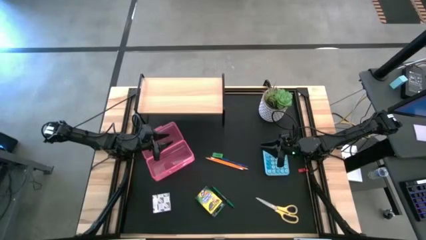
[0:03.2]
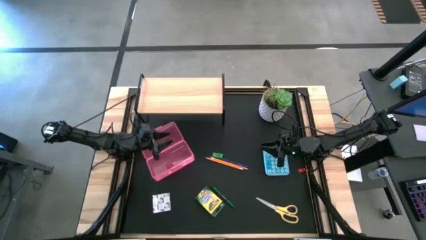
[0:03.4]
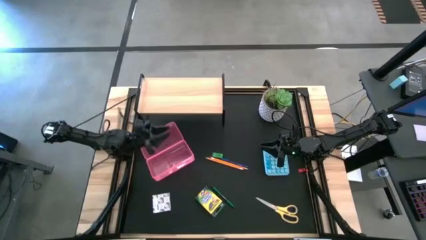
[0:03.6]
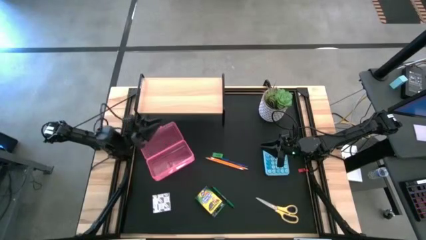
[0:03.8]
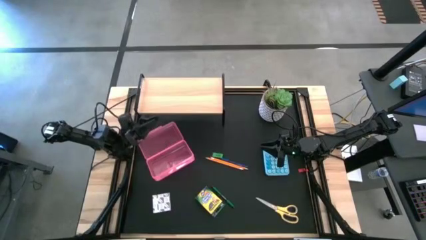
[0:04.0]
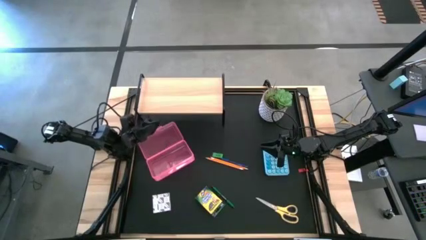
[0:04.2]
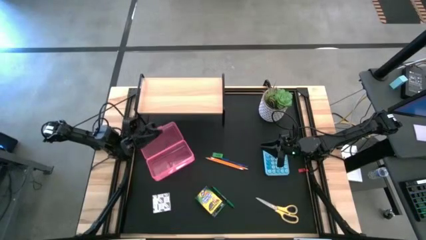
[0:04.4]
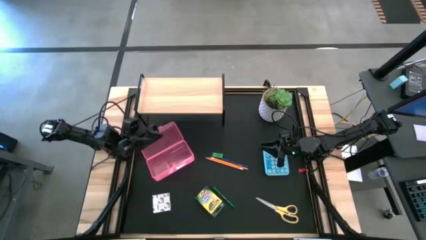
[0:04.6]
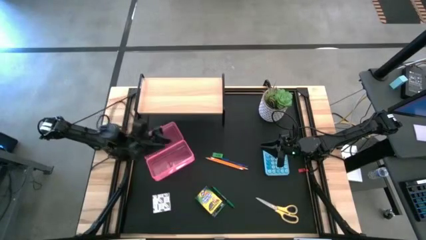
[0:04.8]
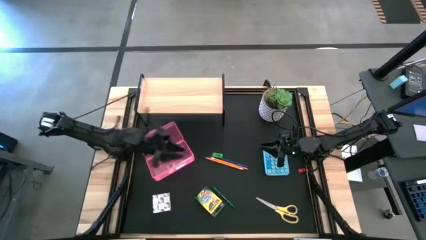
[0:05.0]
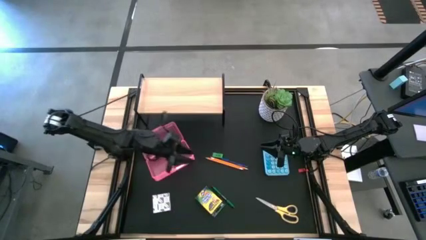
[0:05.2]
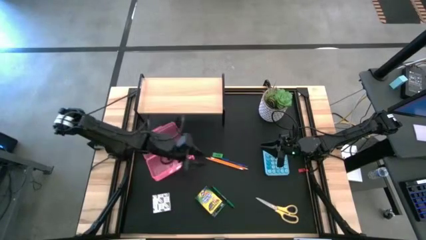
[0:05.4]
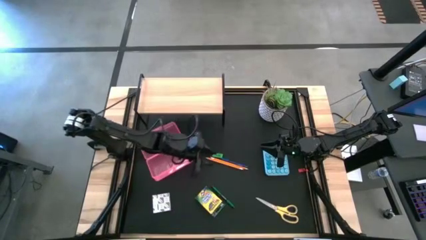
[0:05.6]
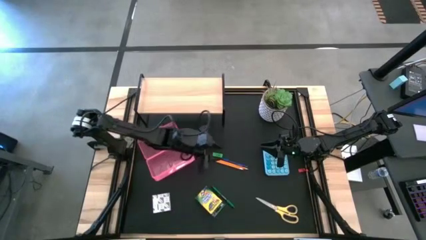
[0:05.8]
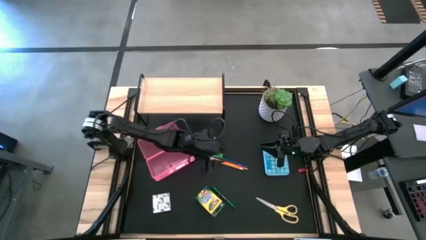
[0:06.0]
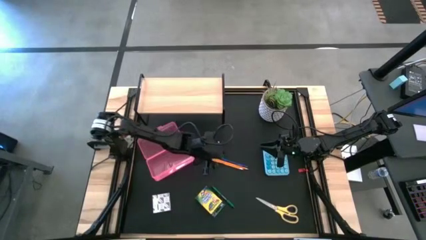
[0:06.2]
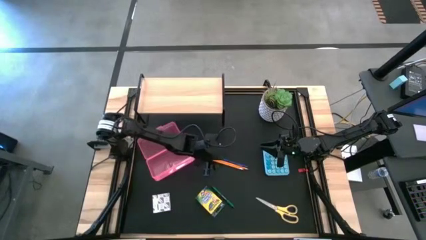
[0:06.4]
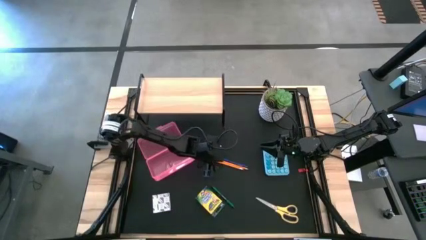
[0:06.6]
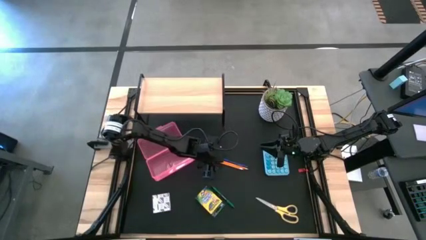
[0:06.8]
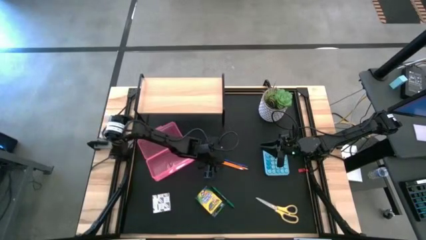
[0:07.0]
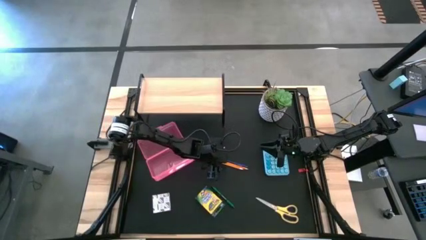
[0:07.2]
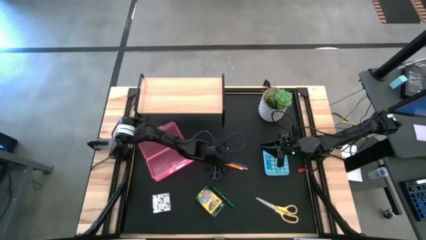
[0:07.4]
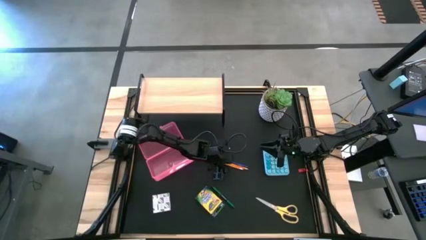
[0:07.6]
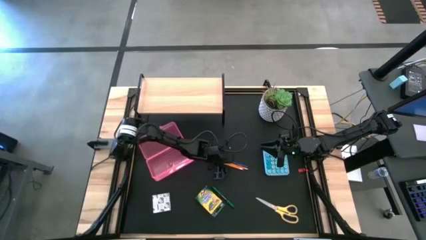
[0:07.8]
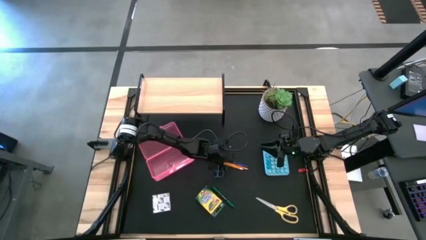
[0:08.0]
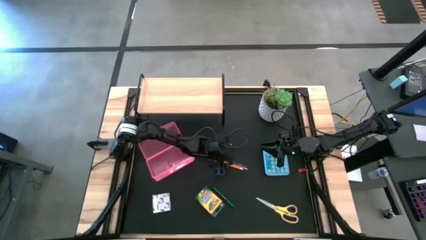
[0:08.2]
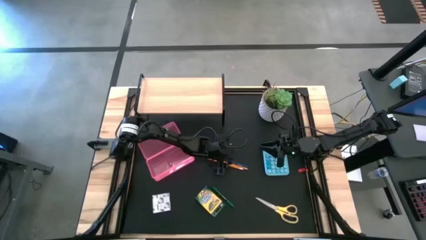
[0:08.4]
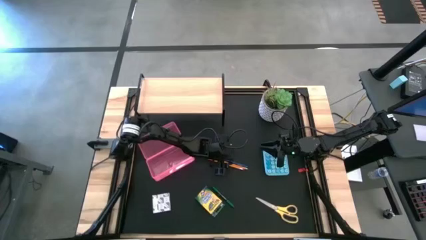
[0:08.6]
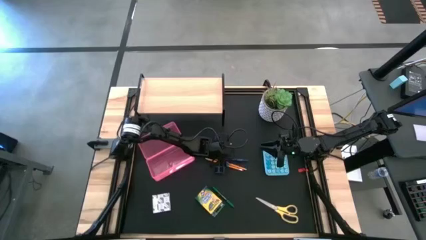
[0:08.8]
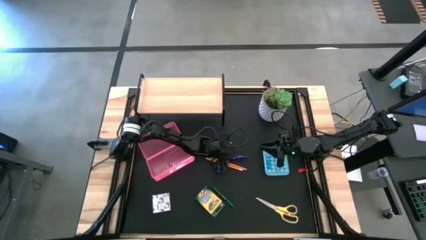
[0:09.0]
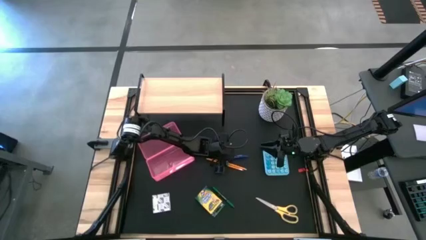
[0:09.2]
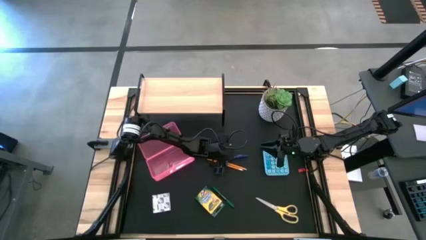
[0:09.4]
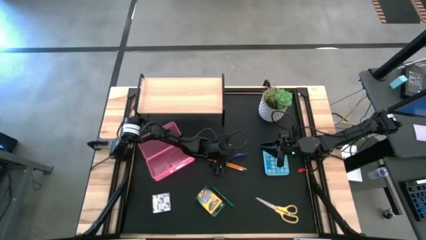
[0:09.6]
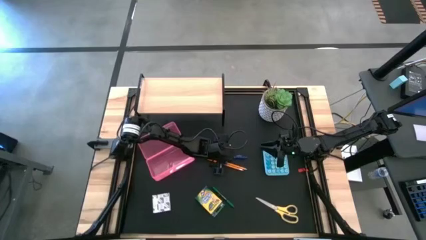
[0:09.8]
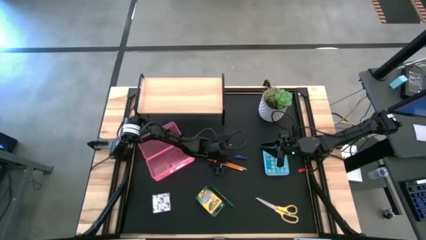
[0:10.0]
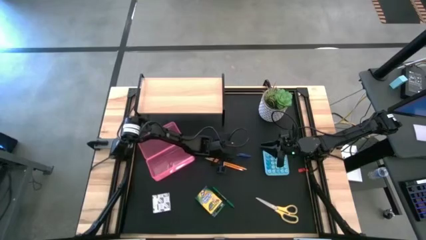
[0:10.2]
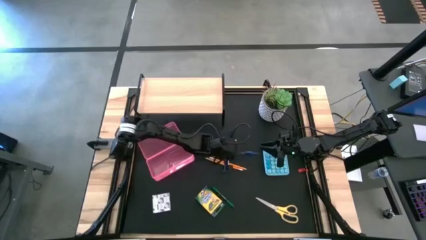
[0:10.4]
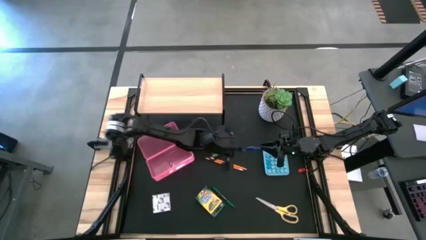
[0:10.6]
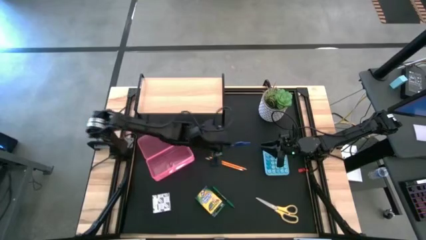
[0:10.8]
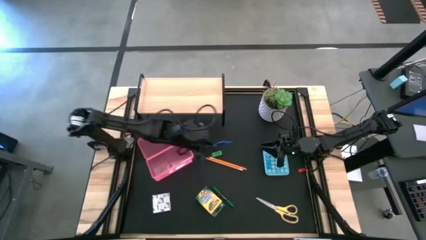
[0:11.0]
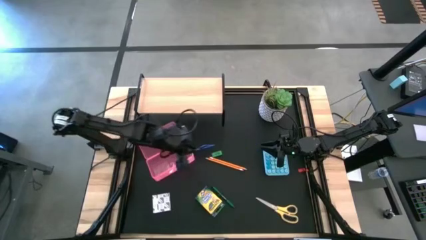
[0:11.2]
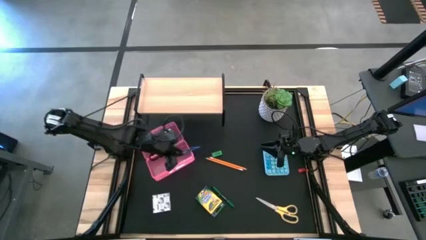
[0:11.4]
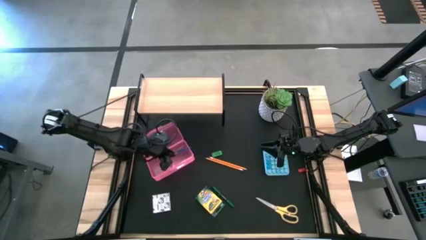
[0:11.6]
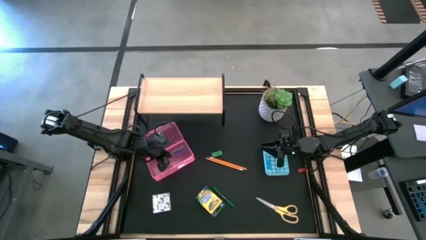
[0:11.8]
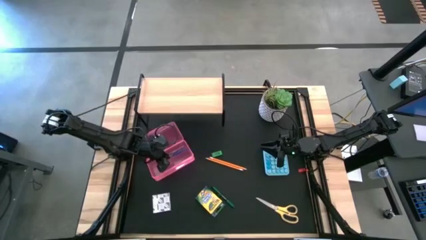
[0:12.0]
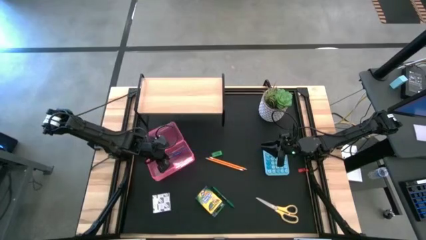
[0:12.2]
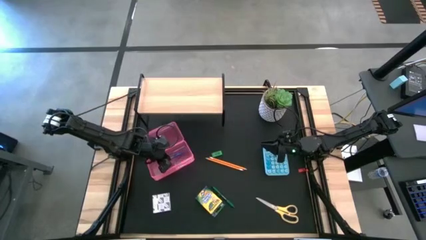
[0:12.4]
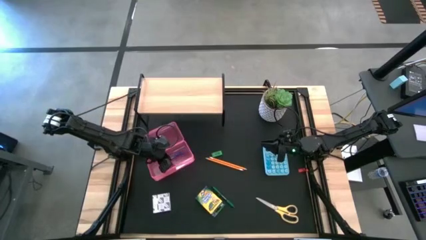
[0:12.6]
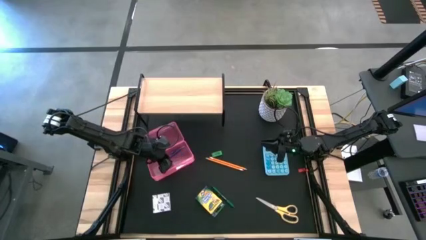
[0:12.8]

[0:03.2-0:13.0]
Task: Pack school essentials
Put the blue pen into the pencil box

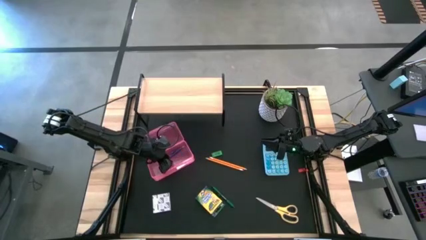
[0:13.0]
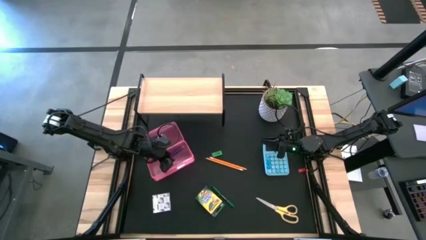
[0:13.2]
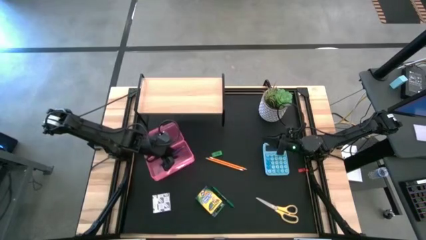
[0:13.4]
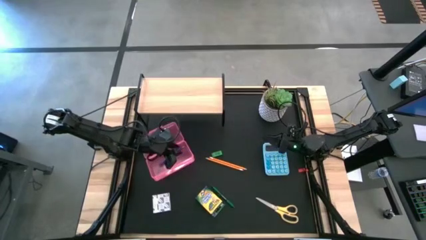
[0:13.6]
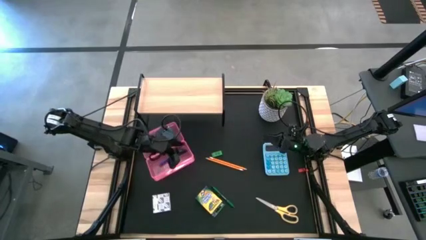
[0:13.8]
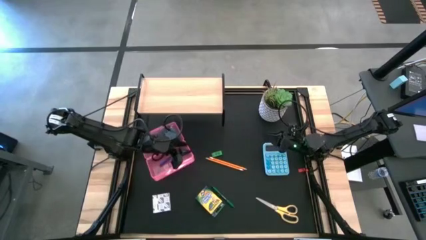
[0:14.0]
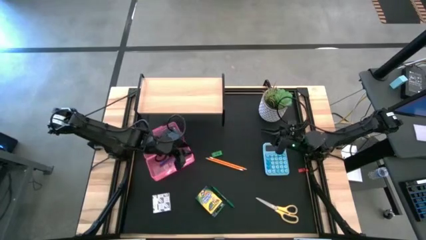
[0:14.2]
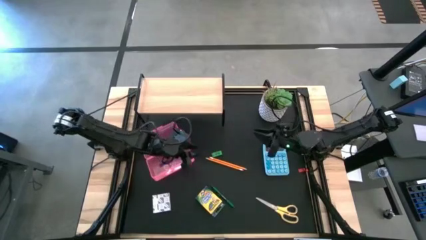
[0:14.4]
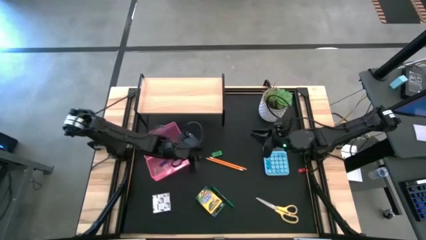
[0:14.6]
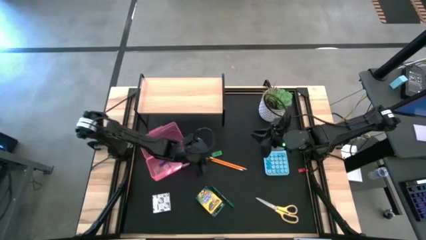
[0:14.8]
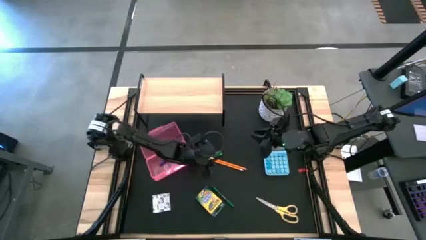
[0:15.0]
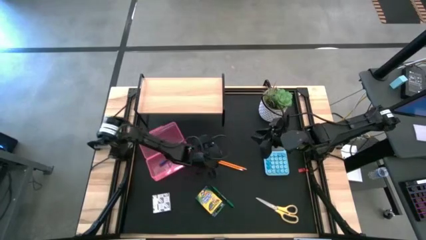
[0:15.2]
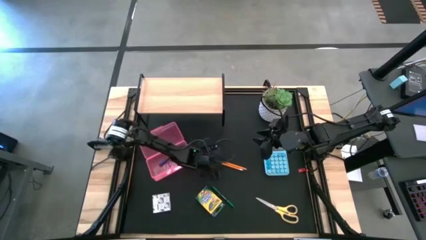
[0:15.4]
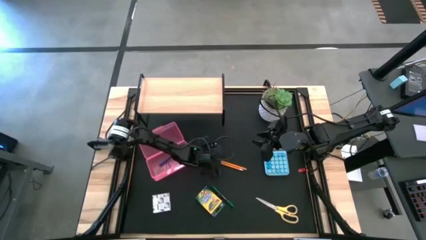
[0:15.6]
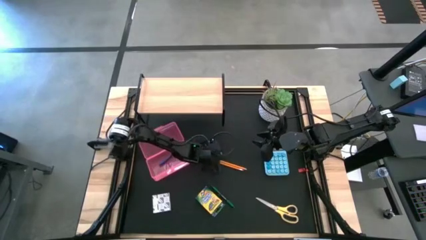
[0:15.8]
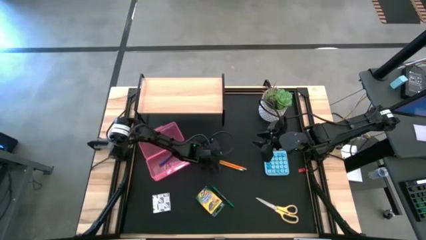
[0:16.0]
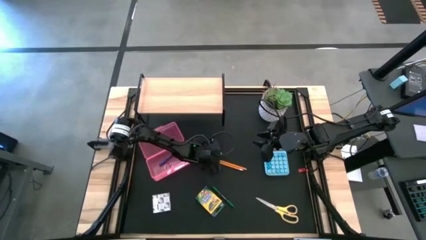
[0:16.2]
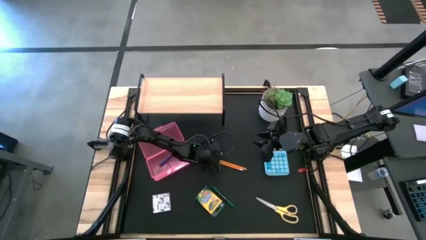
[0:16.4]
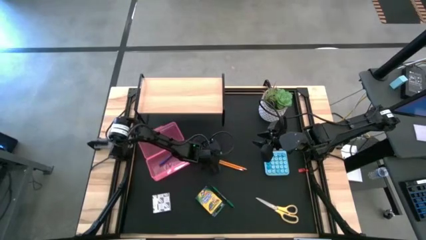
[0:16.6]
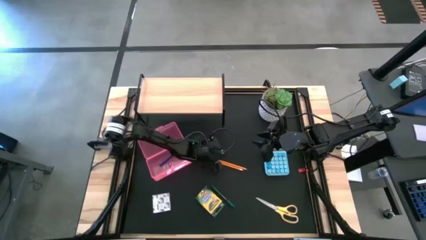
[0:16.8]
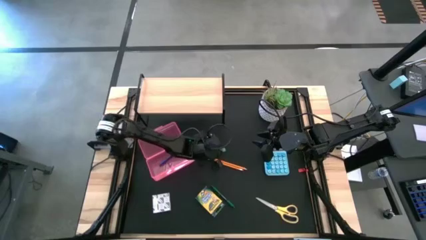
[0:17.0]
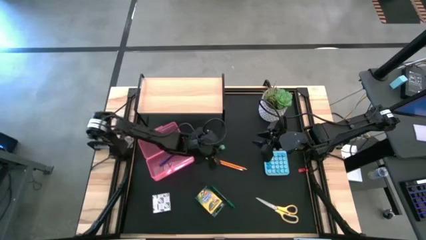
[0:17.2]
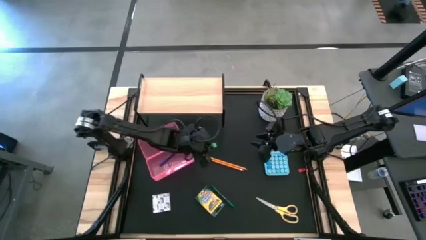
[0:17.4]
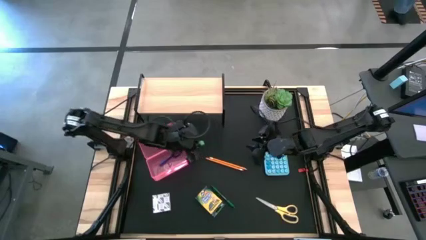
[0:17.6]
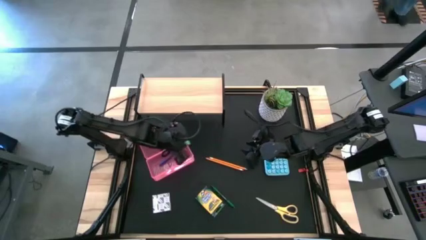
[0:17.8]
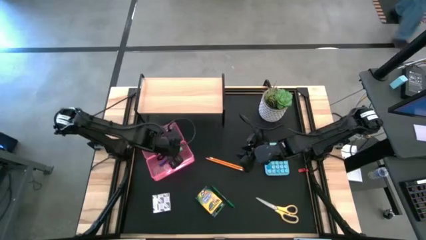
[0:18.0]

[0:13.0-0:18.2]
Put the green eraser into the pencil box

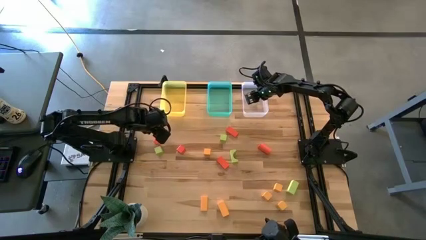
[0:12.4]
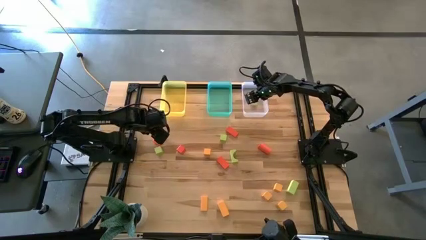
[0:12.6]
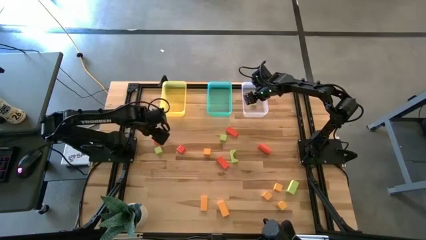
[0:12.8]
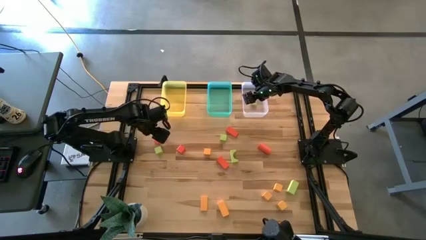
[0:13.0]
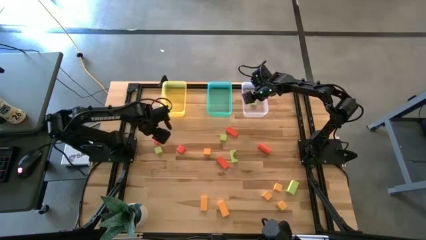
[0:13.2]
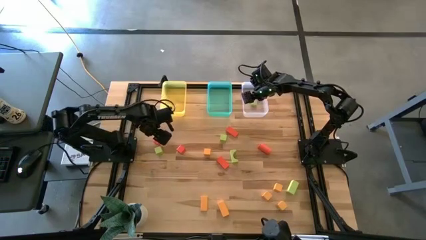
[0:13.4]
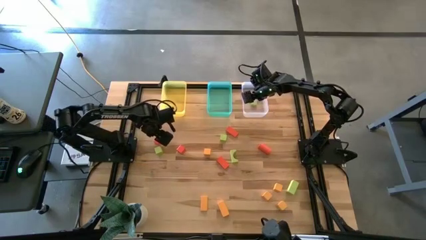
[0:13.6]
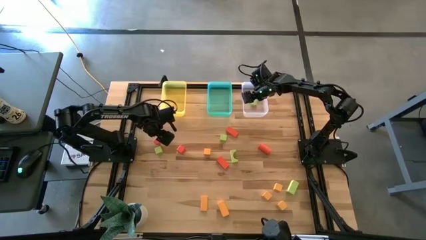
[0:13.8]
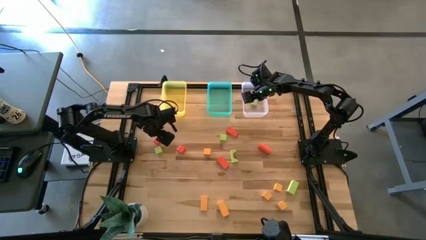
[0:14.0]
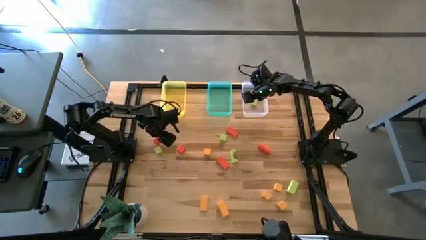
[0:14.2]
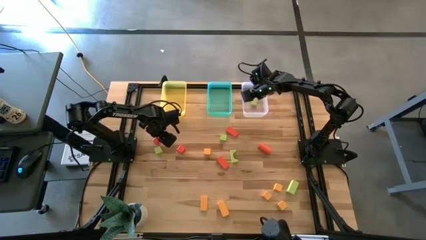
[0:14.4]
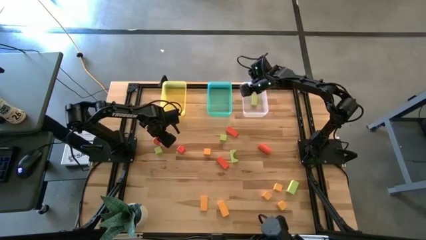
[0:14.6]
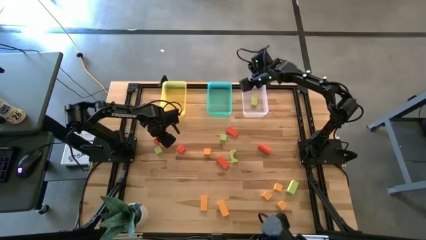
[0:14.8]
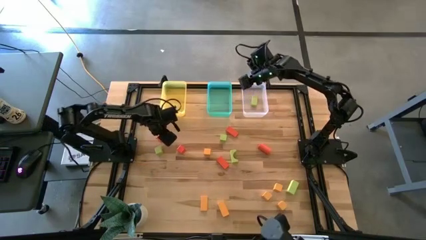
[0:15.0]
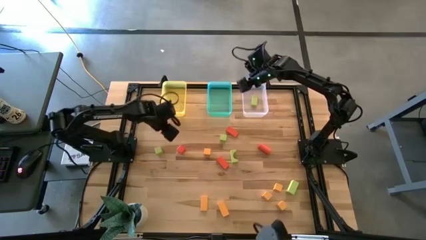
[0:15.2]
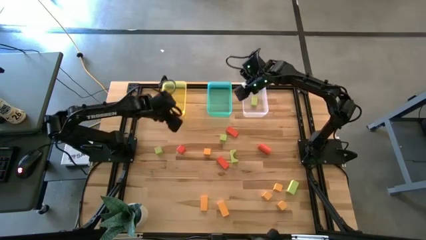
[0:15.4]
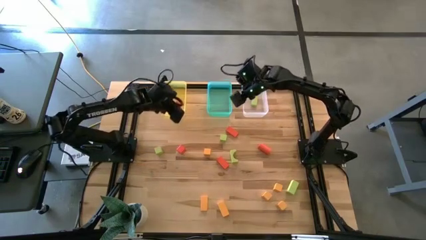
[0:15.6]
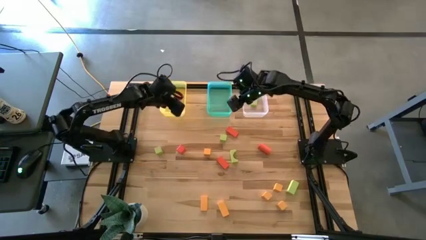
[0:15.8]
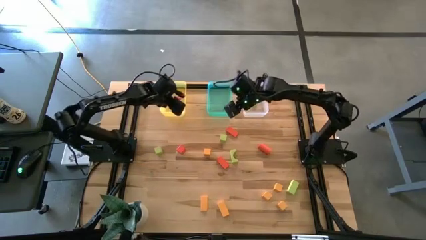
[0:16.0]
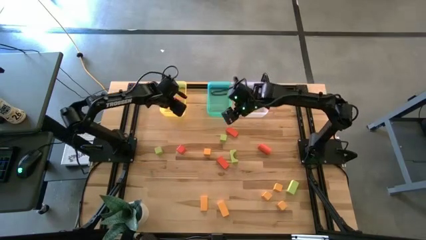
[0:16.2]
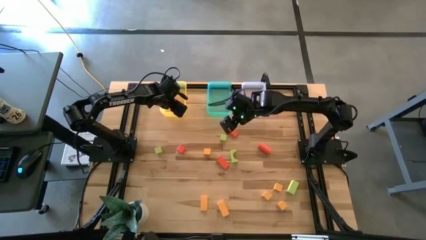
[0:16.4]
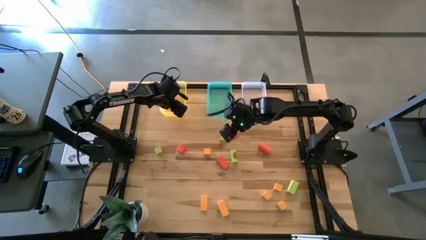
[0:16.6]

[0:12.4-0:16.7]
Task: Sort & place blocks by color
Put the orange block into the yellow bin
